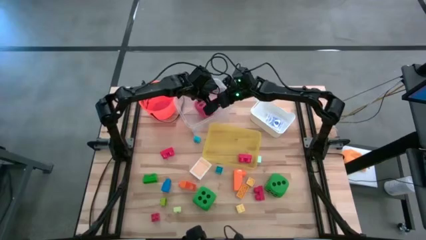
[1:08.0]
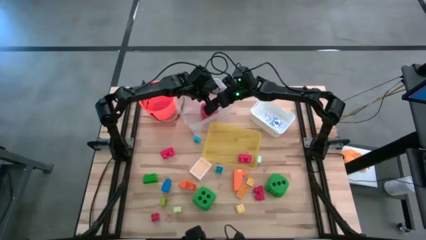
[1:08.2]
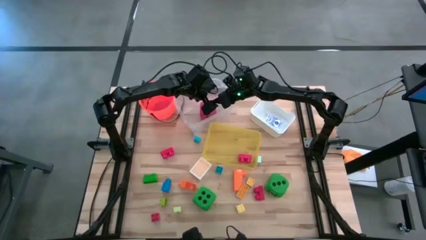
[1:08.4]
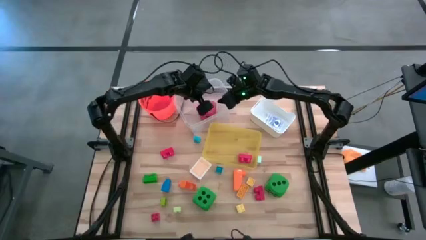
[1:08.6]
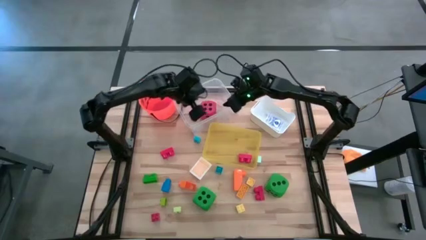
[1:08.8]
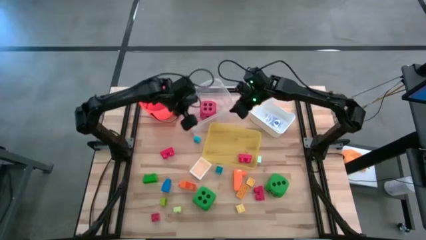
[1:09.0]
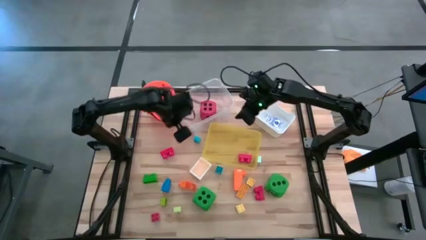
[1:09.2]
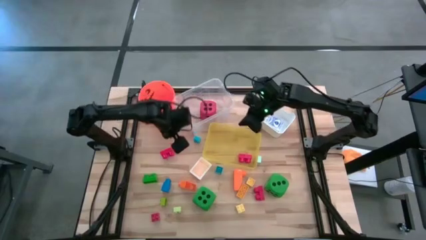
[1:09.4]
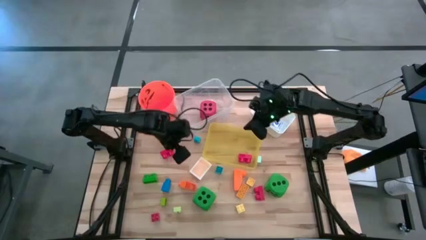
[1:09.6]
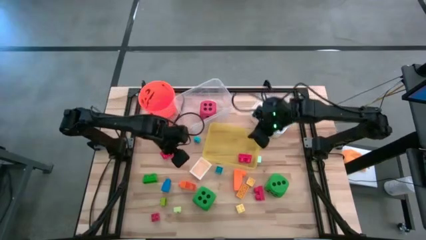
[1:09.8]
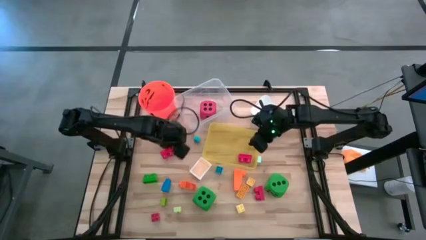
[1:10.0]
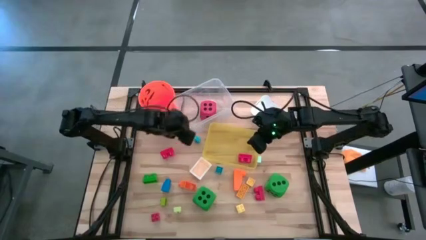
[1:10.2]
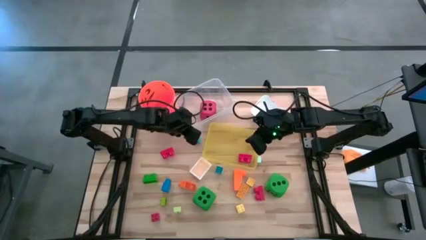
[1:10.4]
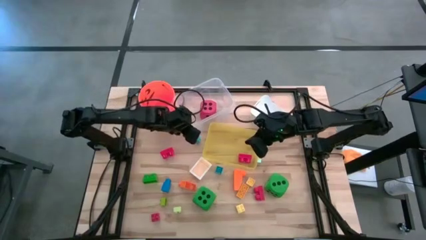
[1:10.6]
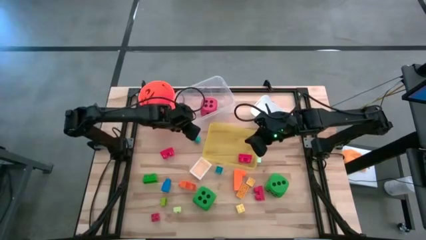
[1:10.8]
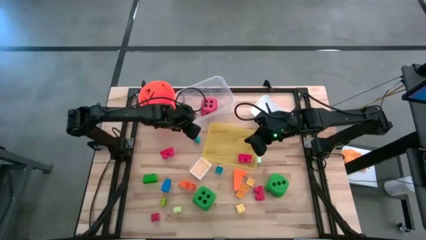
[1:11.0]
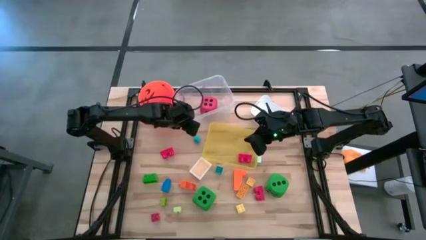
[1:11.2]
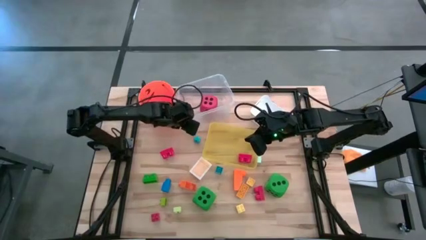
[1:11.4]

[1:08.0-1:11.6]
Task: Pick & Place Toys
Adjust the transparent bin

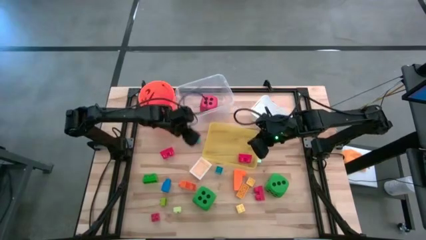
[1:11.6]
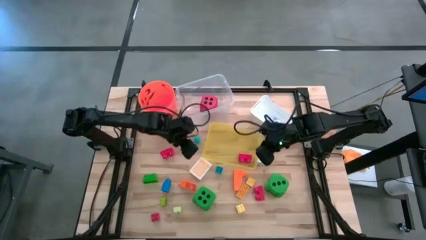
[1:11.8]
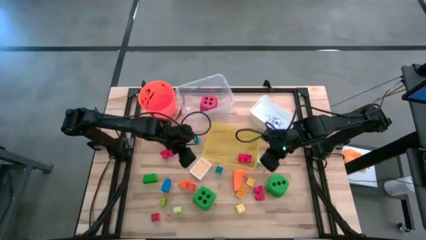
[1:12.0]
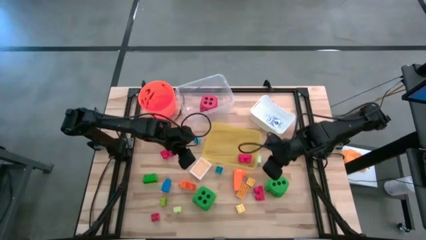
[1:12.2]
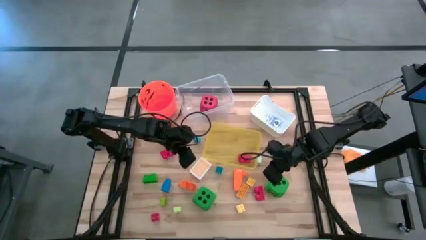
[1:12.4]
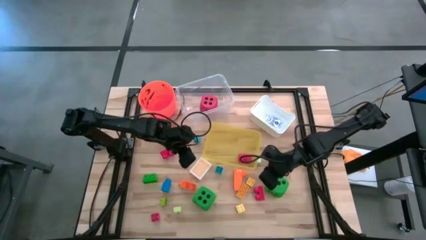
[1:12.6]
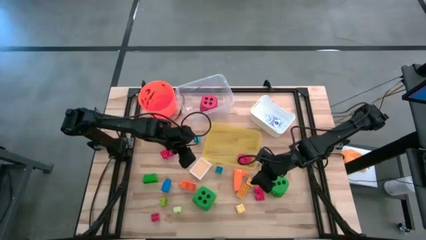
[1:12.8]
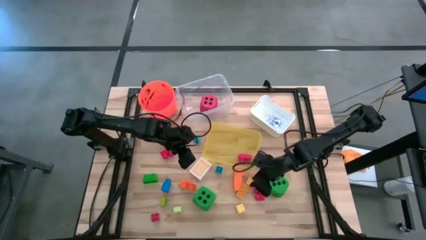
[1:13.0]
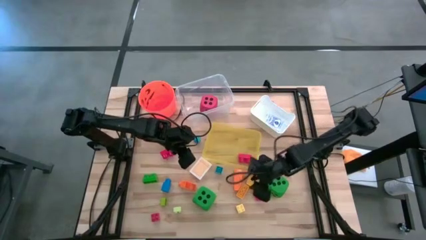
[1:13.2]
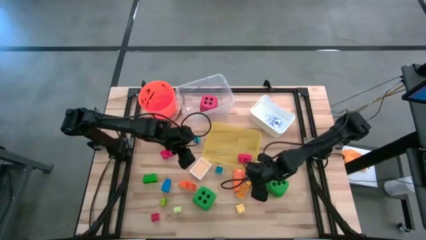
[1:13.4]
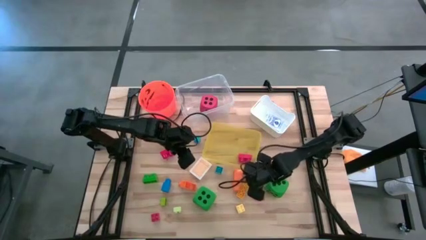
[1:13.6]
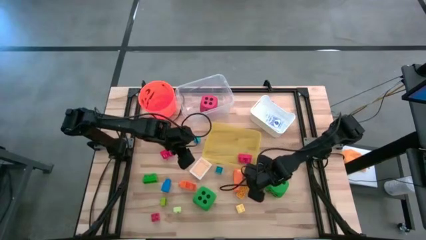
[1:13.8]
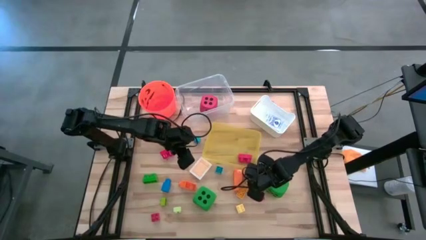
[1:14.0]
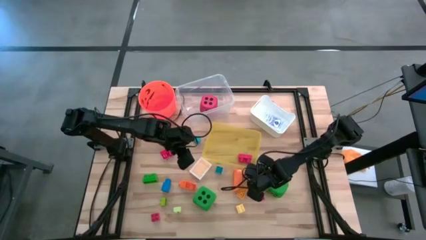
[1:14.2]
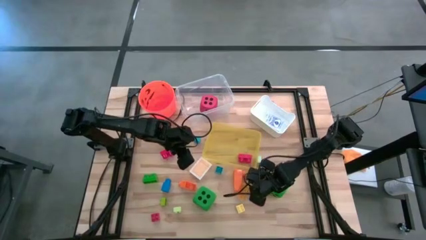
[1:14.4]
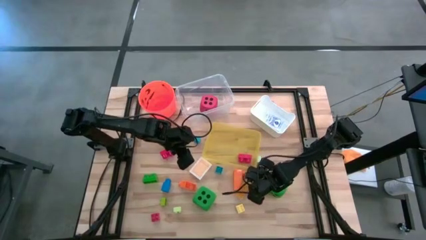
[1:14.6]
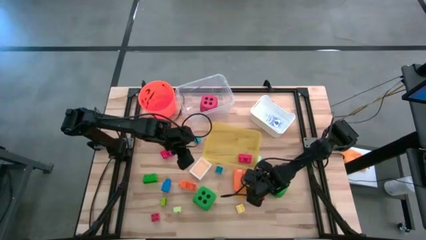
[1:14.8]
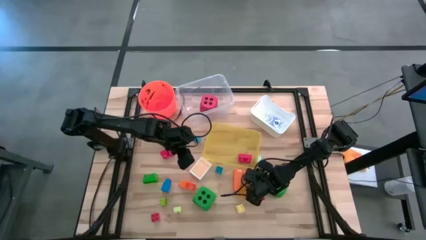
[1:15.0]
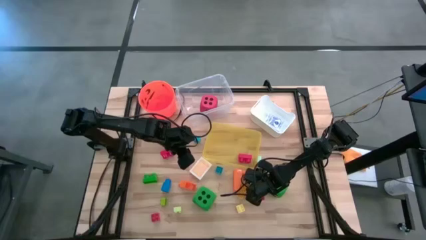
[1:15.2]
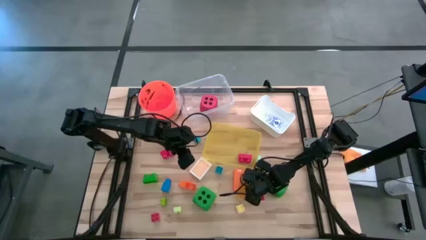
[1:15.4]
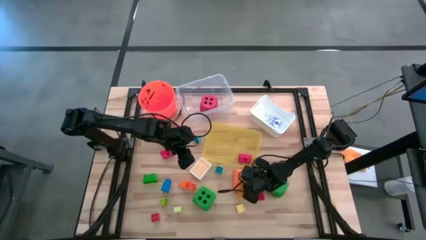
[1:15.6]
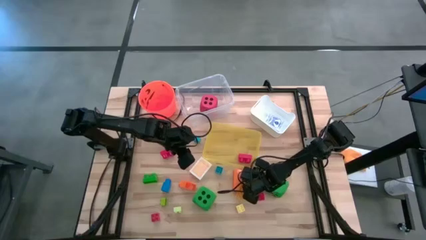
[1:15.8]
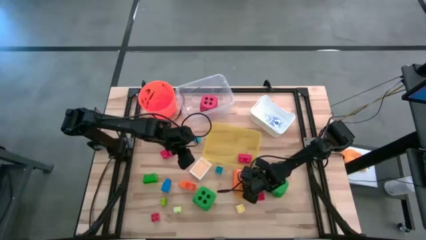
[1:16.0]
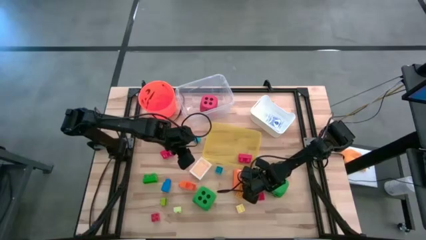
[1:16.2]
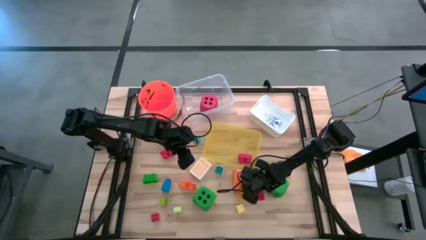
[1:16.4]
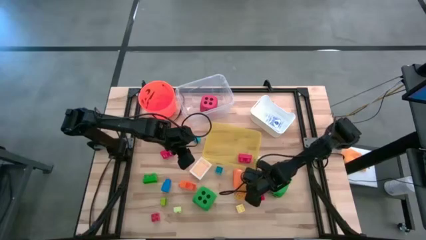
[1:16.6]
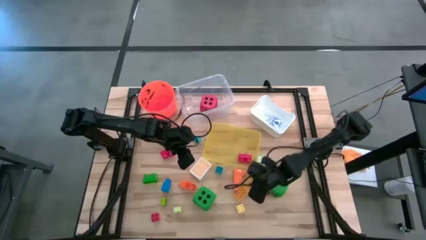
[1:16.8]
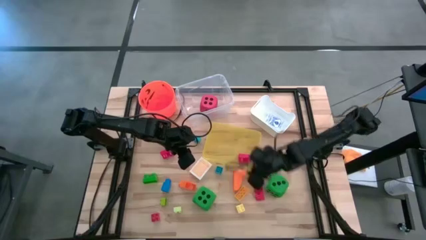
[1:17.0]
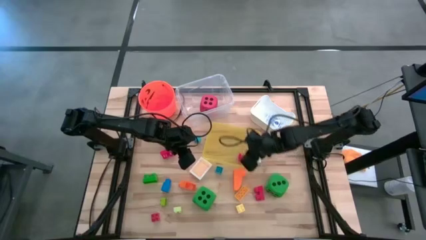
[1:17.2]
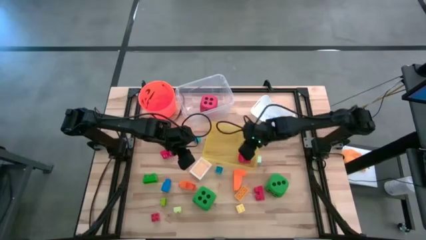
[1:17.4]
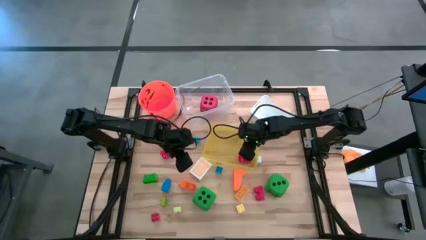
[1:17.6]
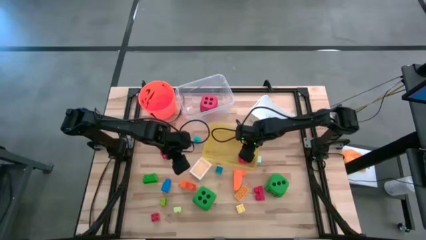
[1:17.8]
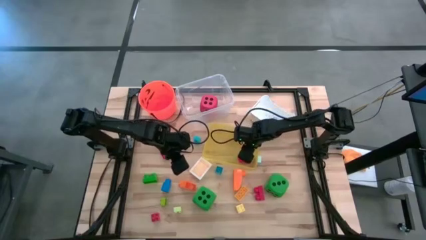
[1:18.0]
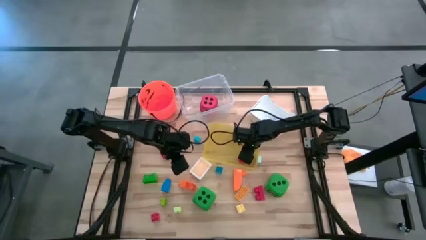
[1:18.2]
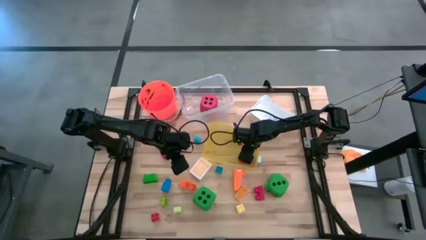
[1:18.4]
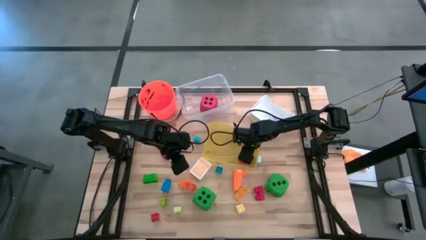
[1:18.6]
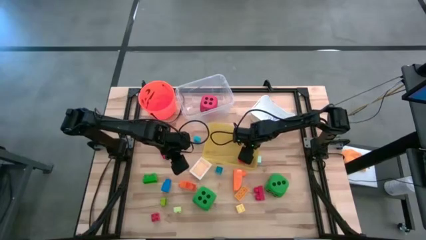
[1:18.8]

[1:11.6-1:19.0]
Put the yellow game piece into the yellow bin

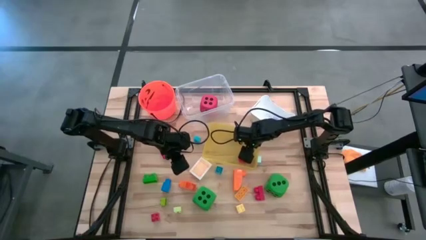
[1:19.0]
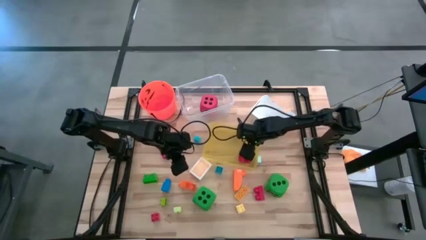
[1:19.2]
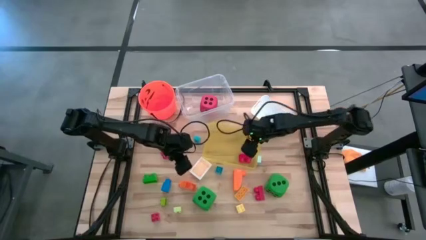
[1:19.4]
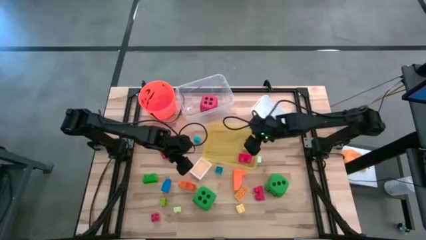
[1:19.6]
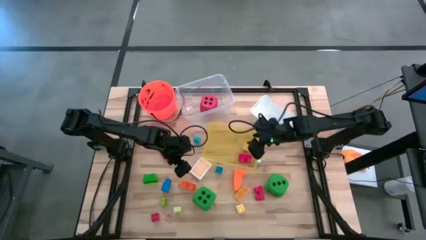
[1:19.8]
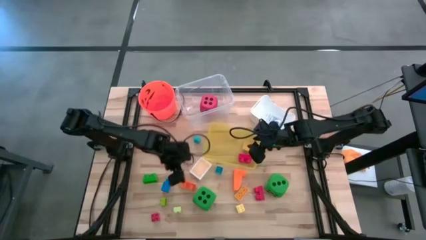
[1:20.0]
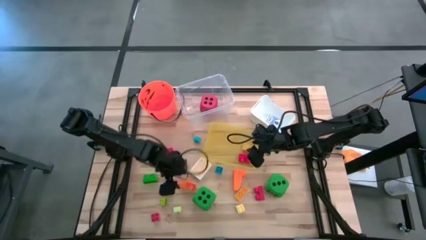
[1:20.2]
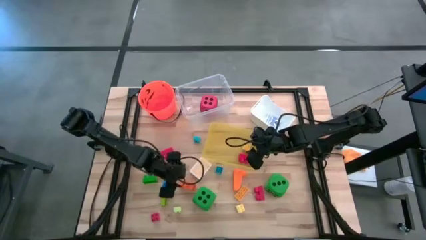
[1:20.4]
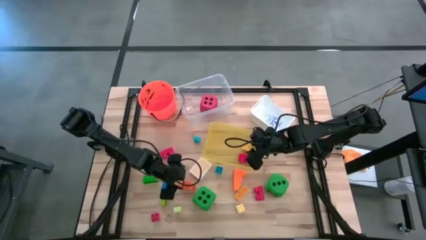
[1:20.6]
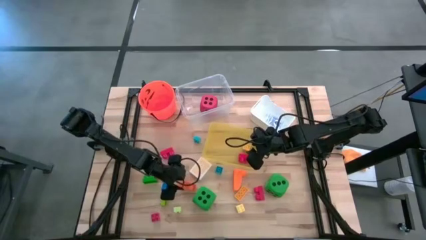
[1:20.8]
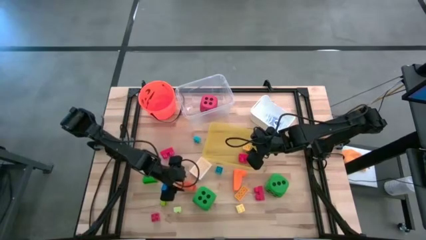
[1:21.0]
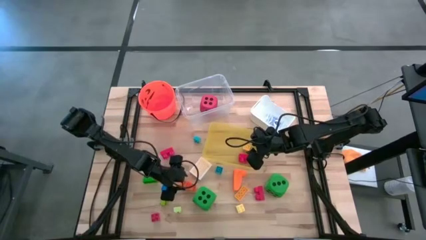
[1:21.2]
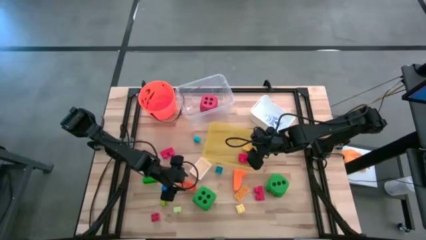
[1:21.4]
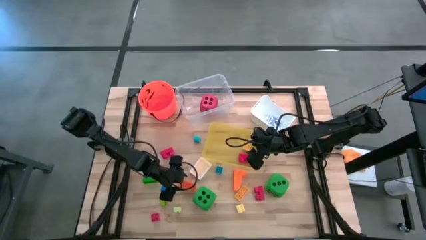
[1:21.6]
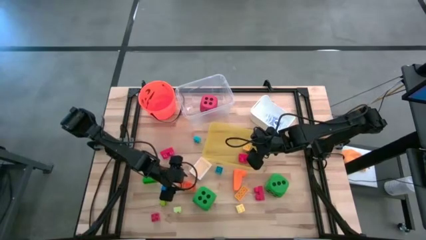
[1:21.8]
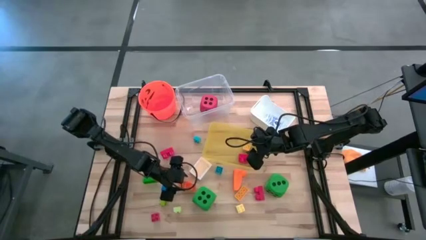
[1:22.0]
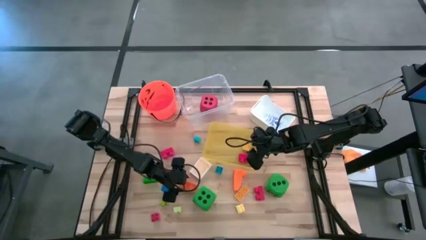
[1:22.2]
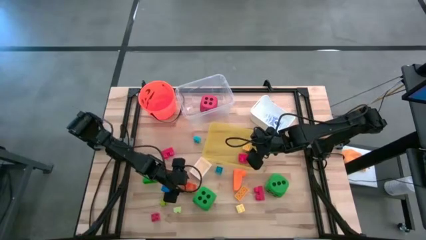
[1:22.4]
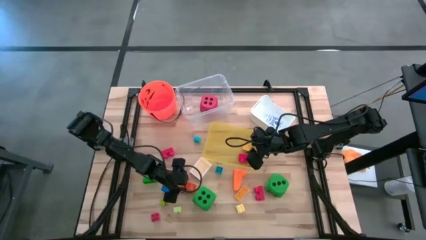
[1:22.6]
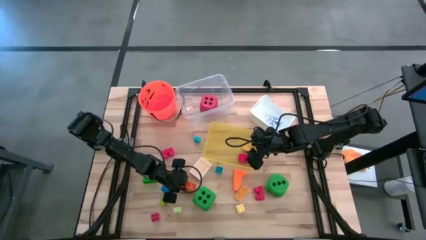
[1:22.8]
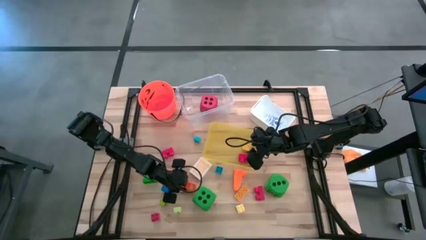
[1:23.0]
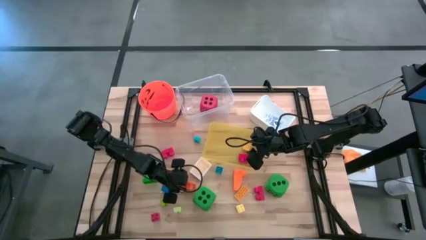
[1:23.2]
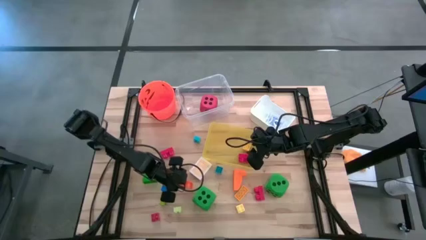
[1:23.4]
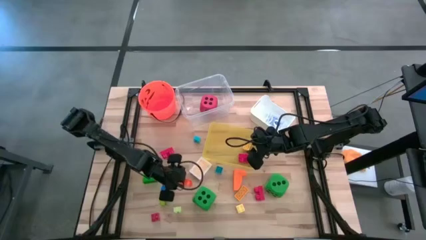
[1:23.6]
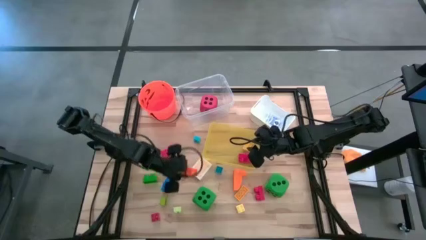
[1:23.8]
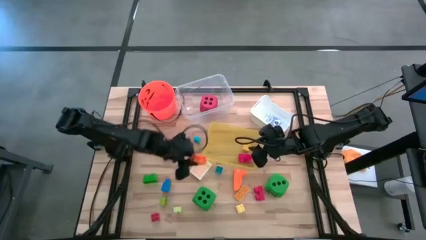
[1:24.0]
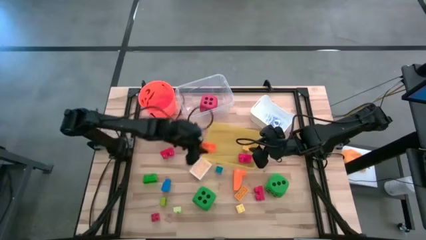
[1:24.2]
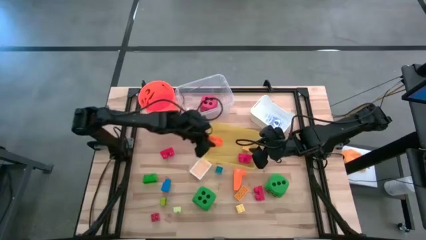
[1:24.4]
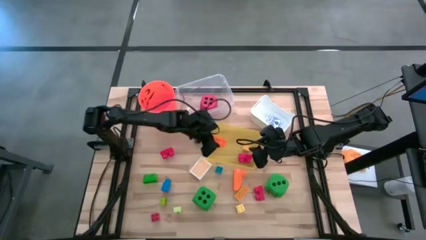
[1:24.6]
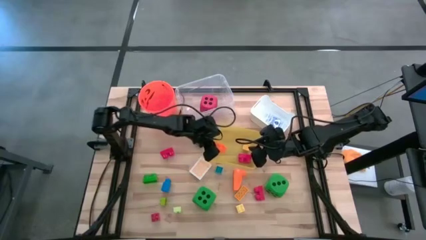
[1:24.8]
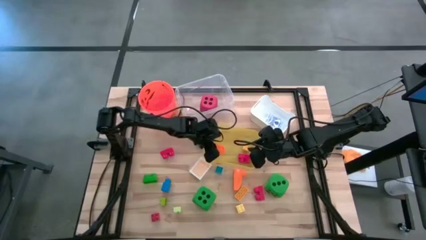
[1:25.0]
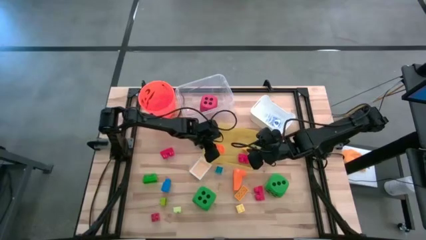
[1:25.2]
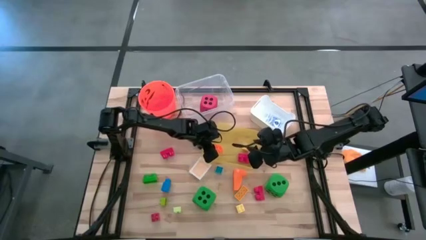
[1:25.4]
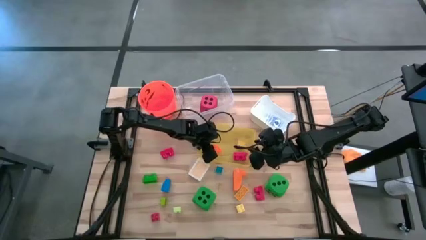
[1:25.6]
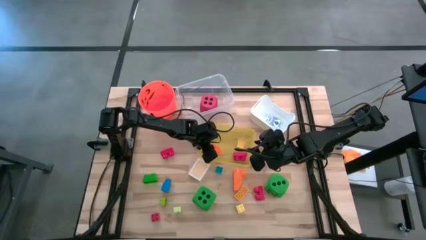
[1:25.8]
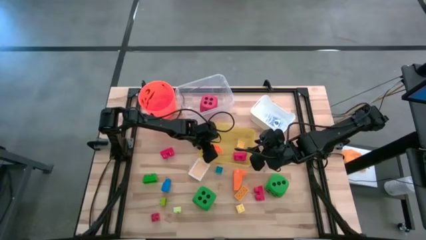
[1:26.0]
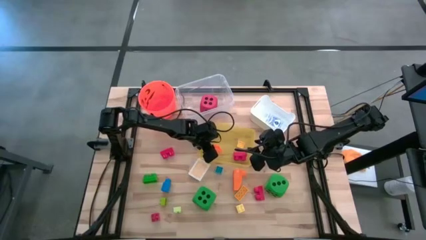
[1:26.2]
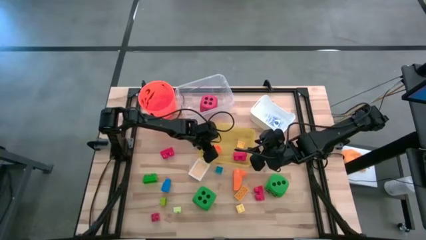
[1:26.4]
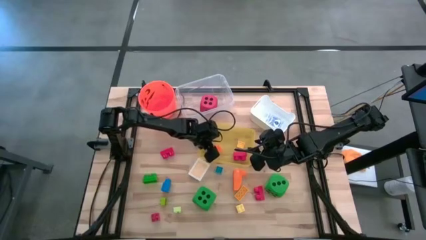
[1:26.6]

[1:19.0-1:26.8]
Put the orange game piece into the yellow bin
